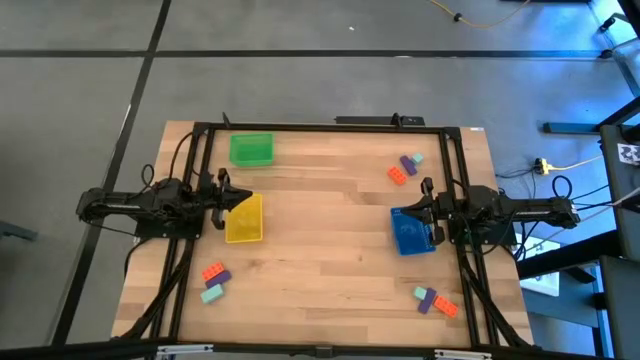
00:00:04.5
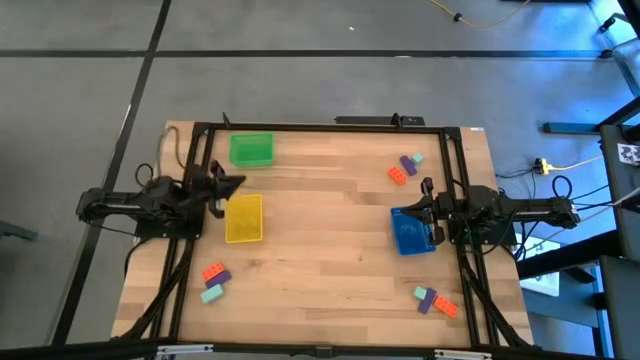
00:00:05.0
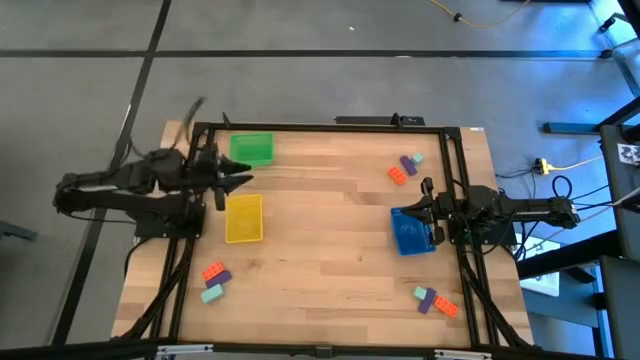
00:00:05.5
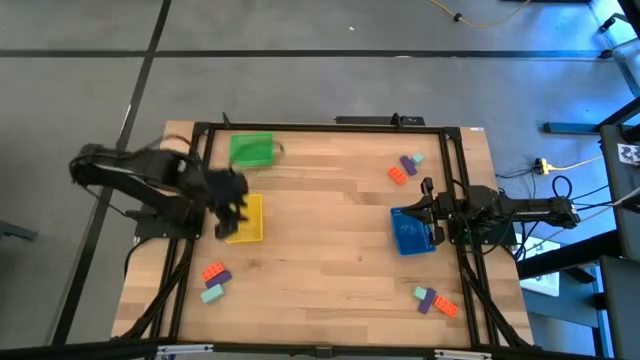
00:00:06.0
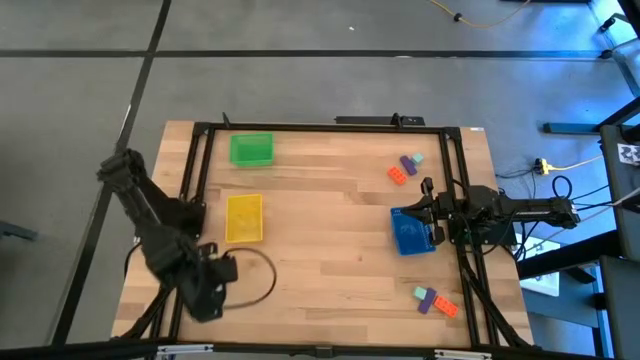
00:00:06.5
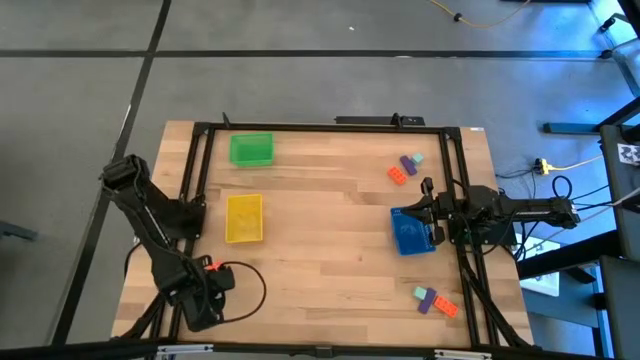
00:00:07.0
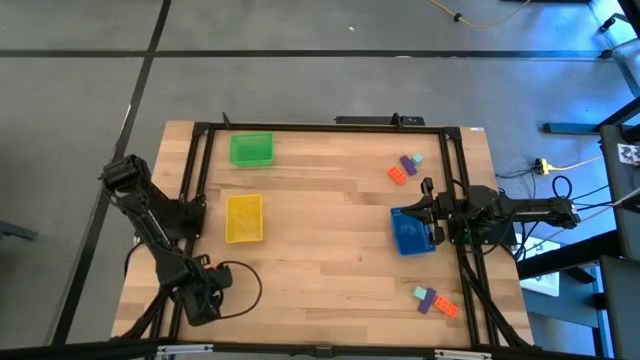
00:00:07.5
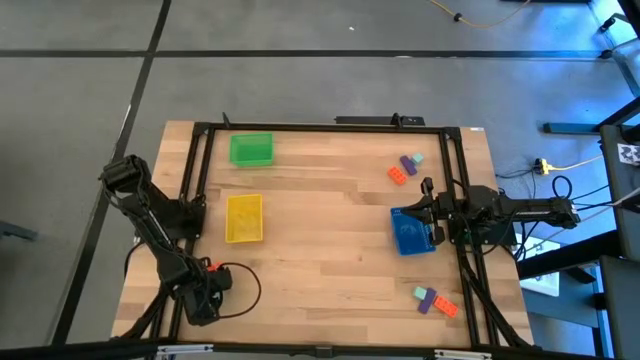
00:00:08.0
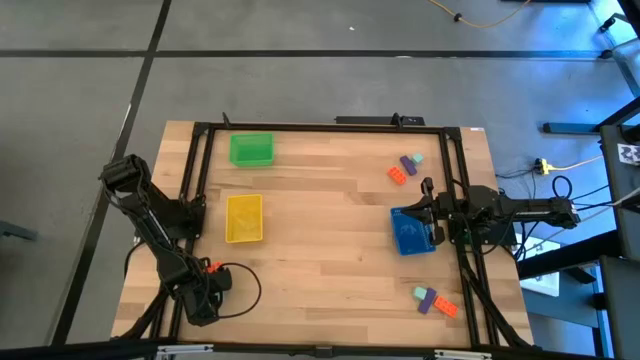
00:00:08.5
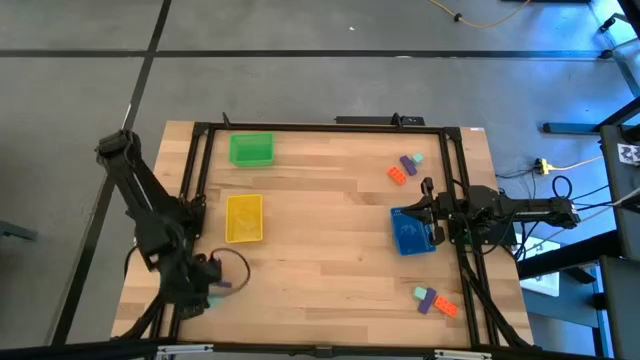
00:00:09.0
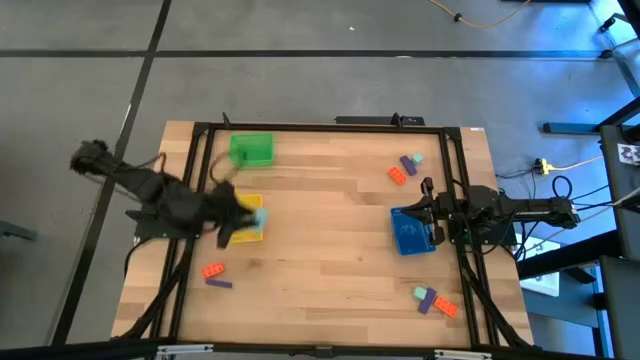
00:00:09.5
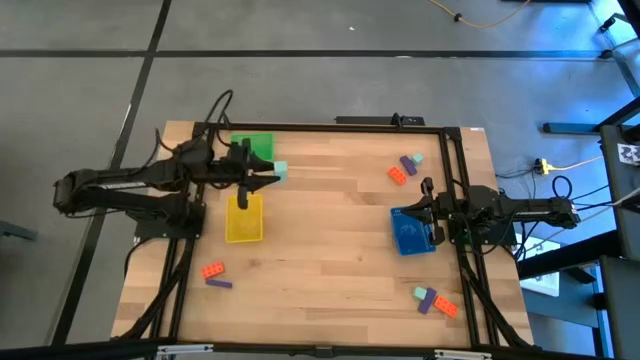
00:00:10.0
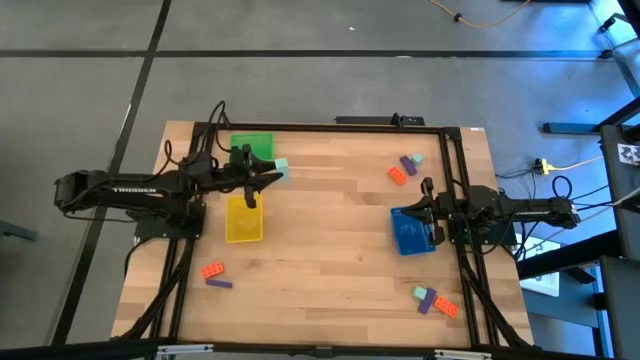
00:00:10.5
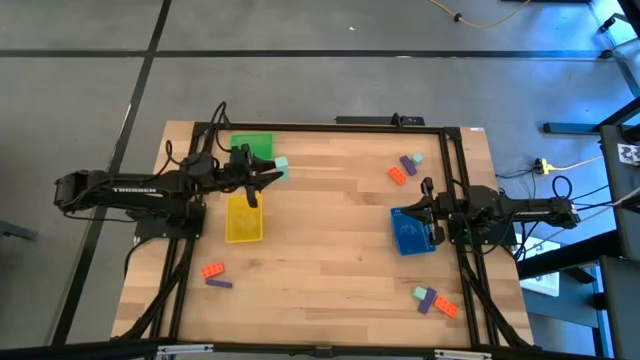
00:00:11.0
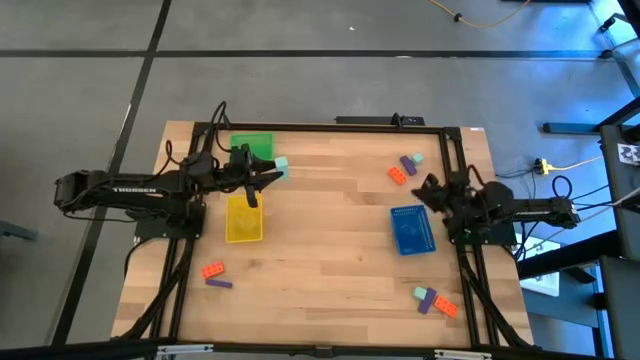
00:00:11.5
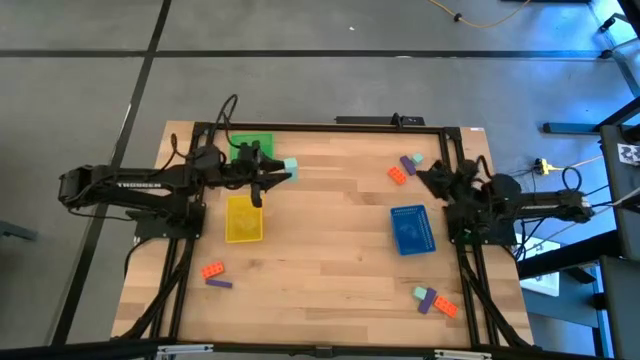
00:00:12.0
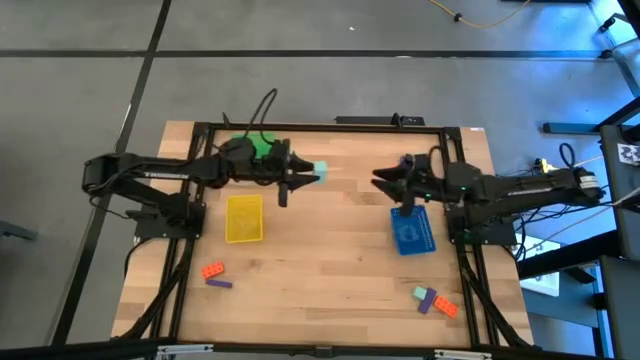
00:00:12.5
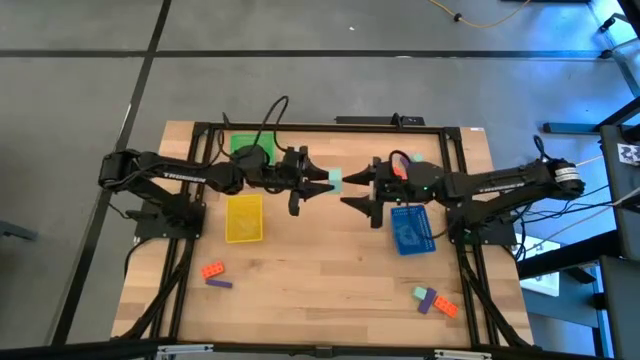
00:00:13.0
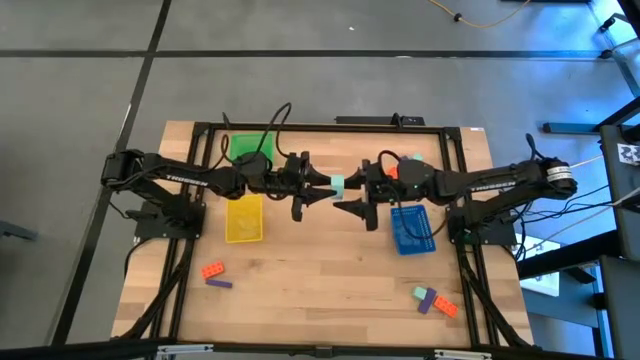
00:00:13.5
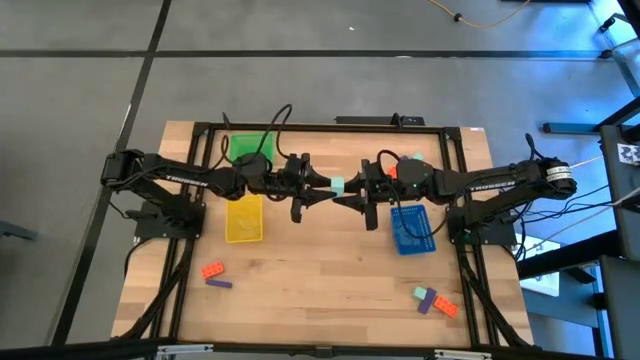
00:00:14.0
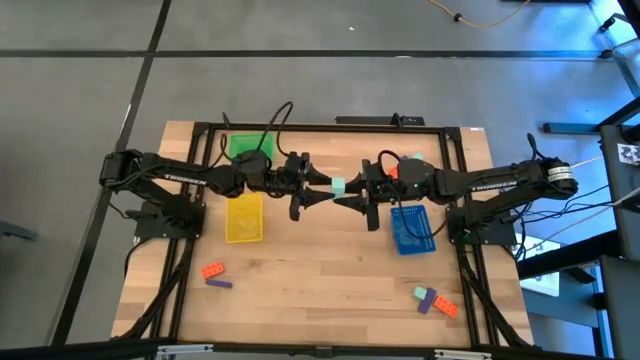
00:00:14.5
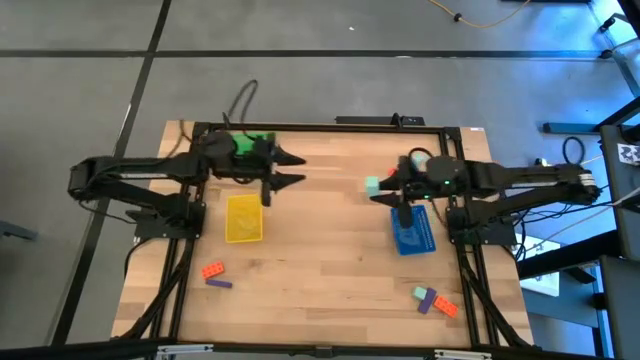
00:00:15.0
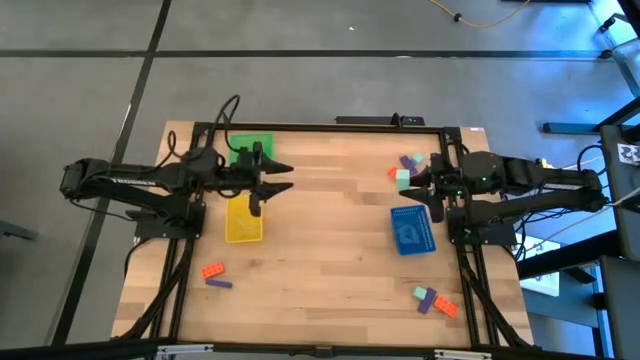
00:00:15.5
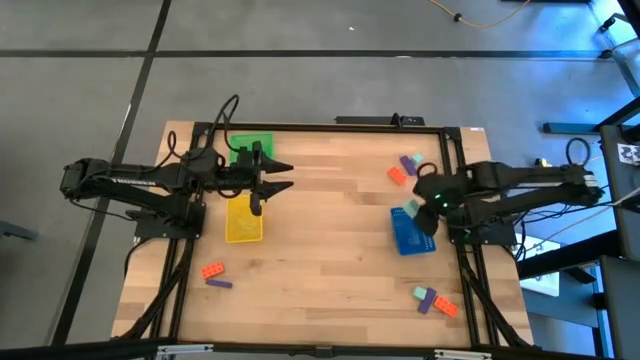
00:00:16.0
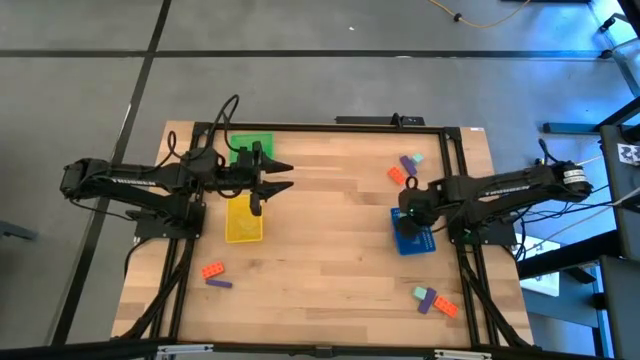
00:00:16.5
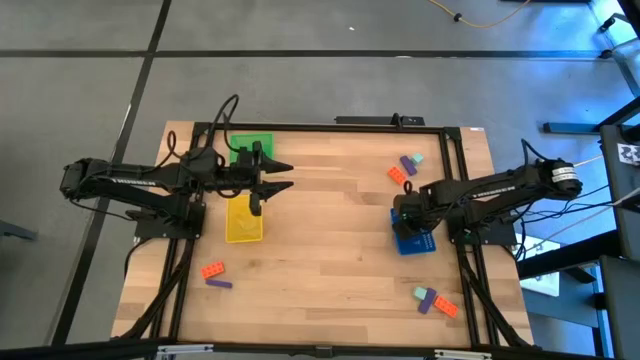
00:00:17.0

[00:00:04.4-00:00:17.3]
Task: Sort & place blocks by color
Put the bottom left blue block into the blue bin

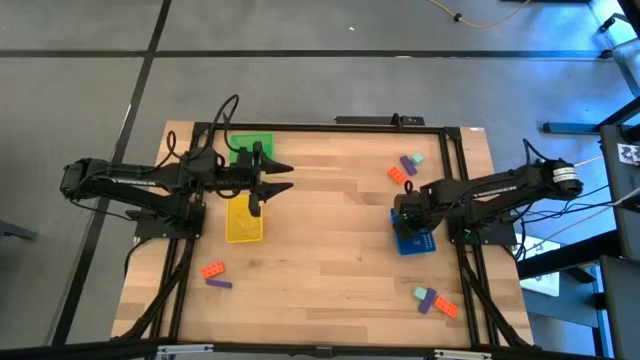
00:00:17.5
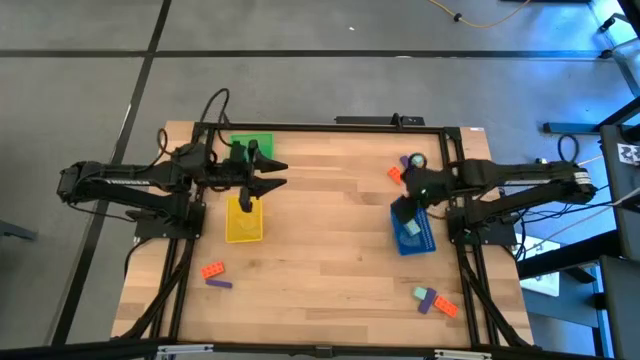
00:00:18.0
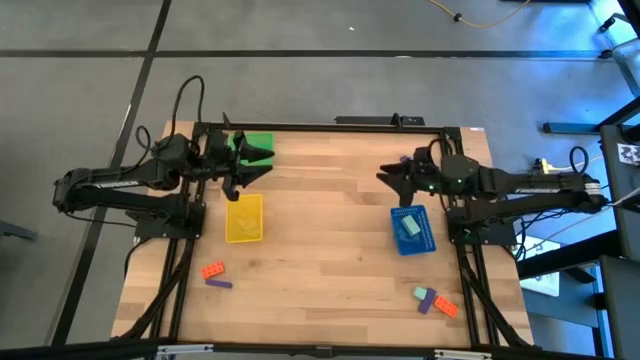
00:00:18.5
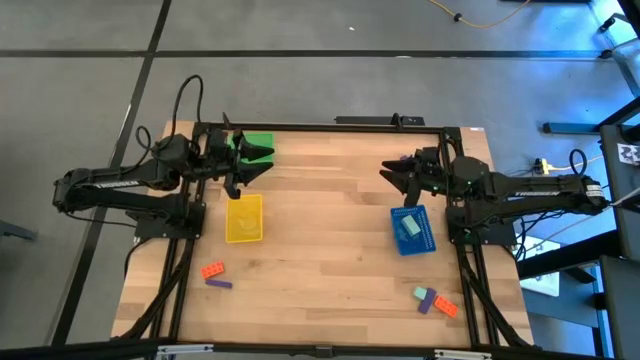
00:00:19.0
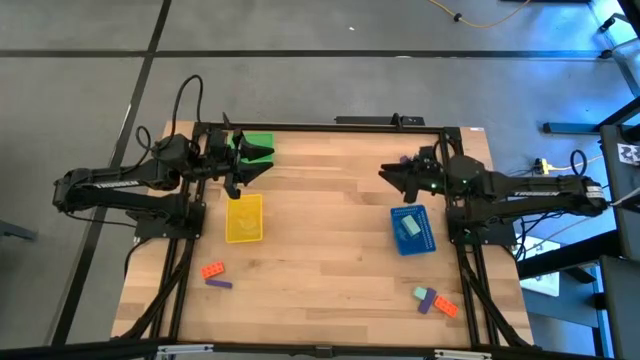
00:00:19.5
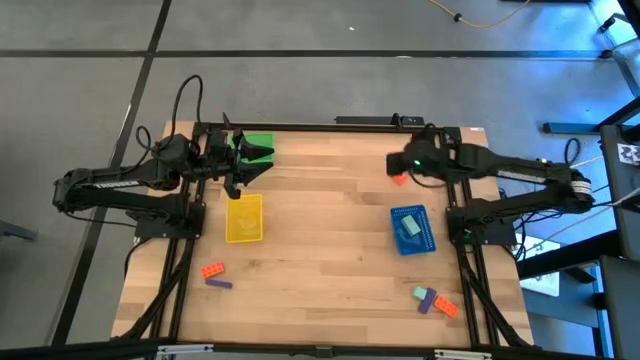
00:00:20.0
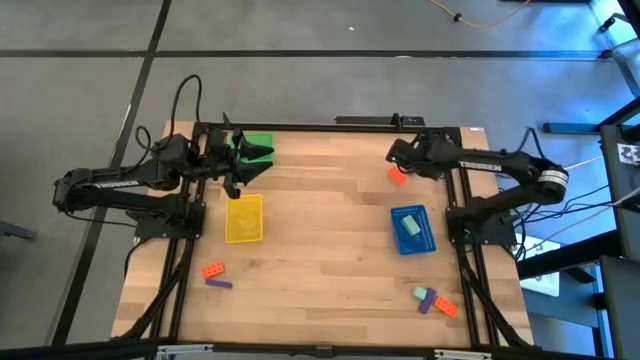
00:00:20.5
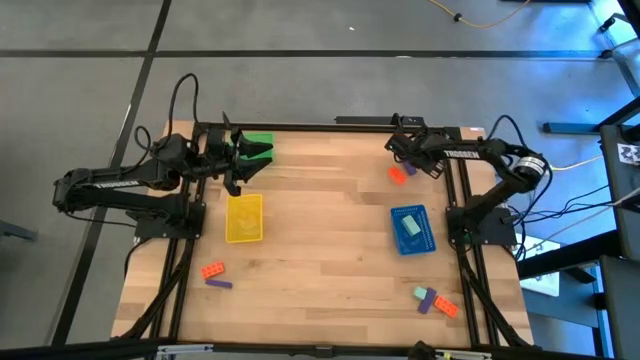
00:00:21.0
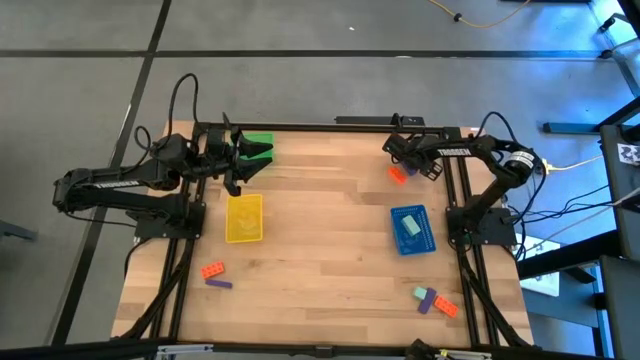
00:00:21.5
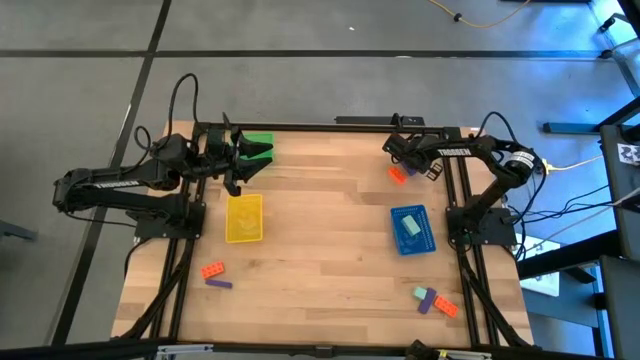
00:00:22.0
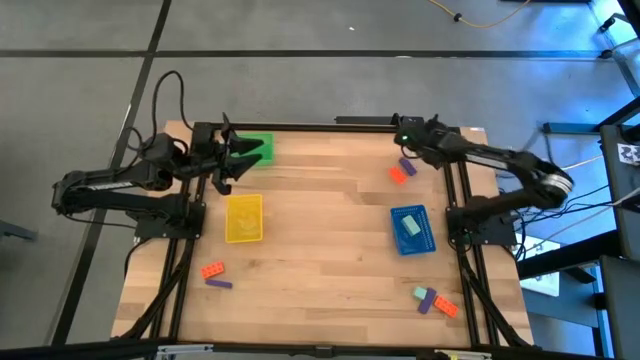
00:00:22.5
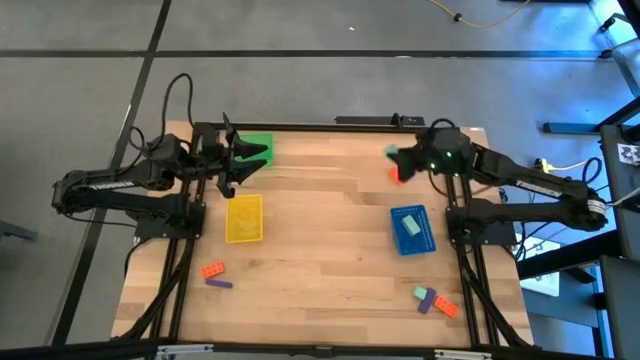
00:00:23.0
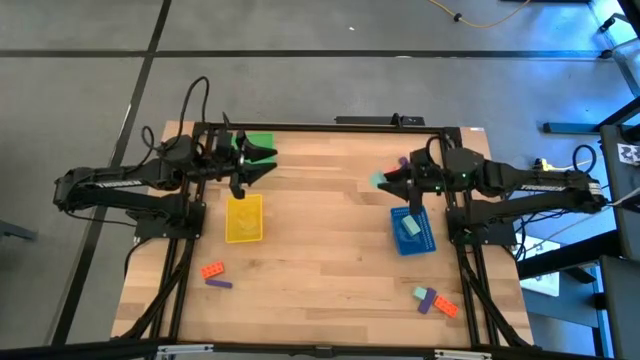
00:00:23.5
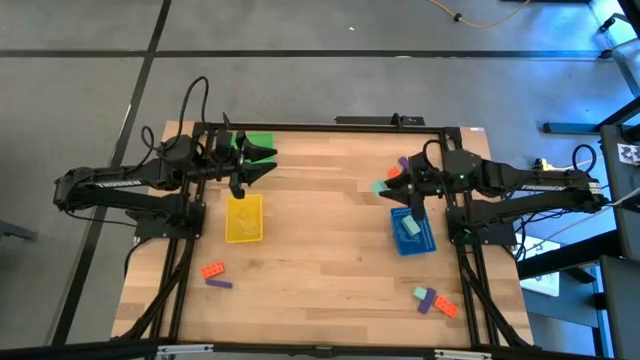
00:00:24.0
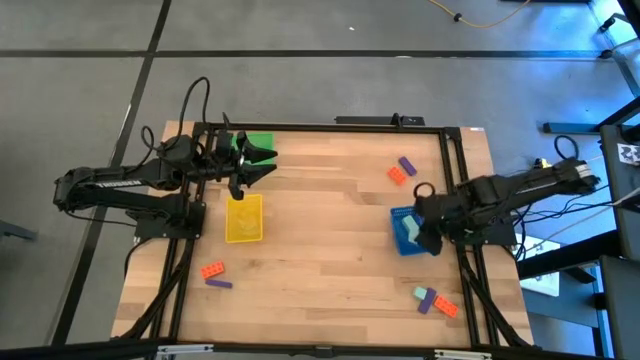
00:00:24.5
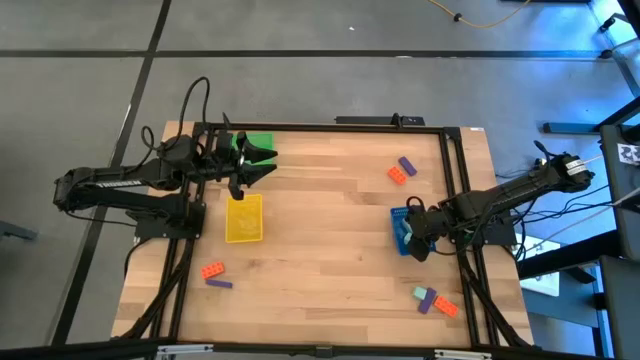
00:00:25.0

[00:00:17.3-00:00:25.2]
Put the top blue block into the blue bin
